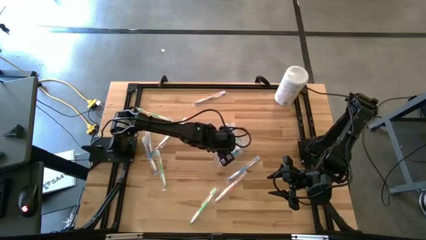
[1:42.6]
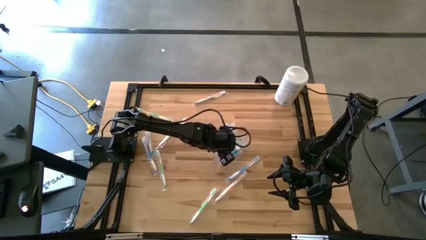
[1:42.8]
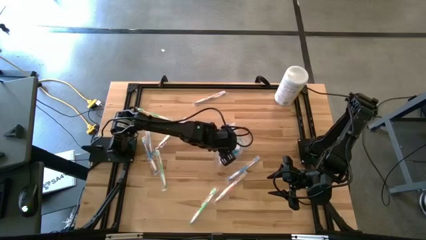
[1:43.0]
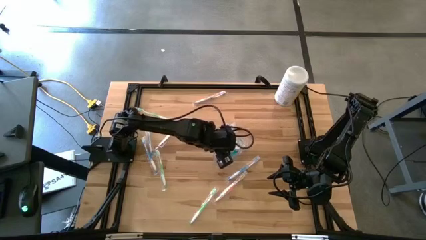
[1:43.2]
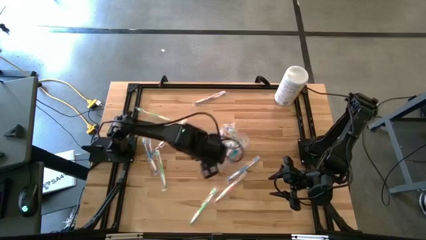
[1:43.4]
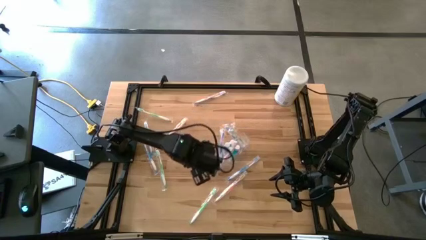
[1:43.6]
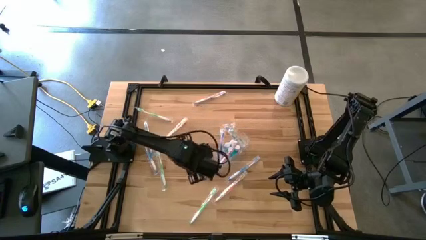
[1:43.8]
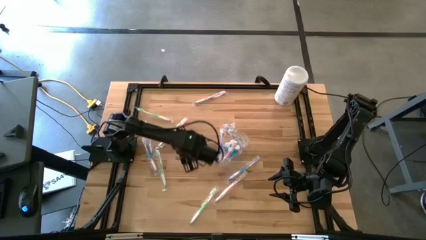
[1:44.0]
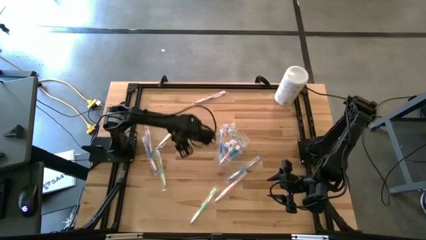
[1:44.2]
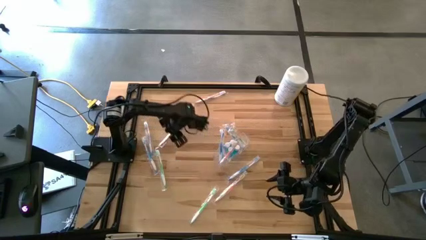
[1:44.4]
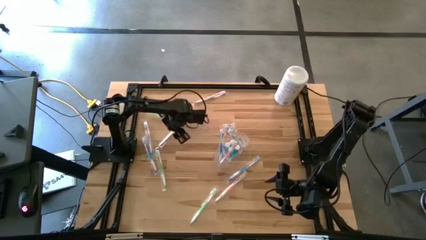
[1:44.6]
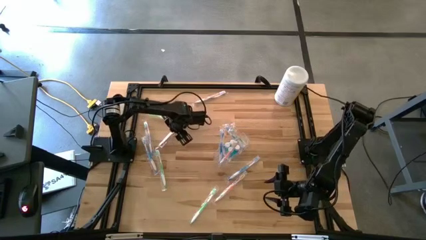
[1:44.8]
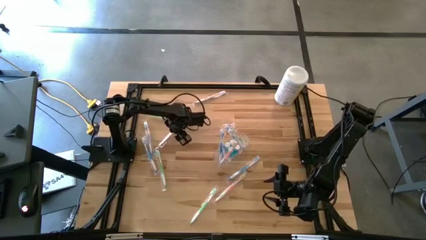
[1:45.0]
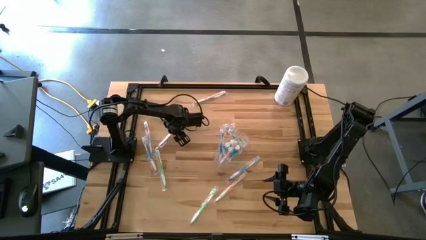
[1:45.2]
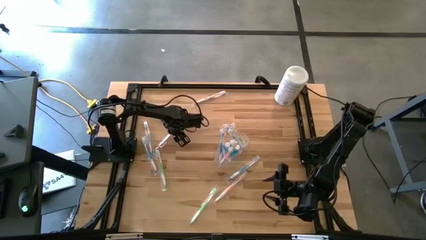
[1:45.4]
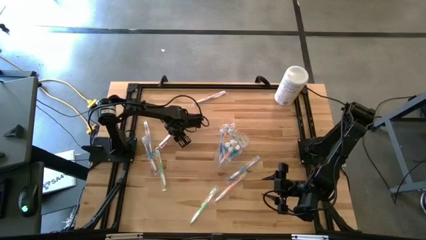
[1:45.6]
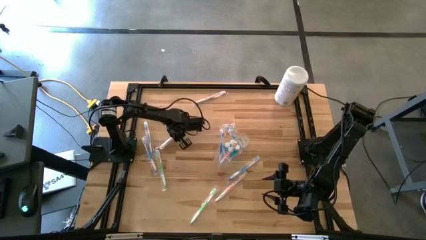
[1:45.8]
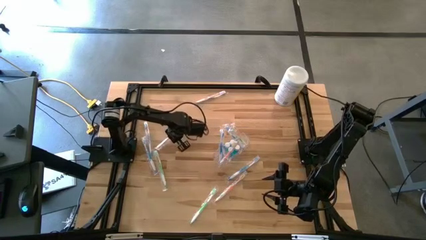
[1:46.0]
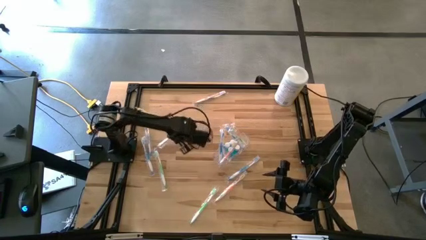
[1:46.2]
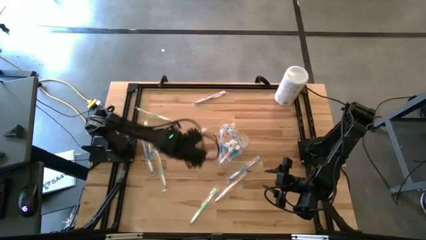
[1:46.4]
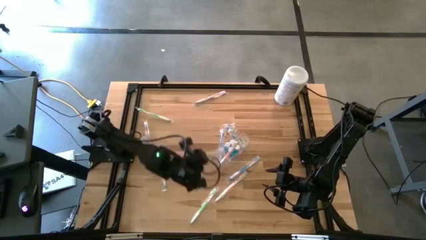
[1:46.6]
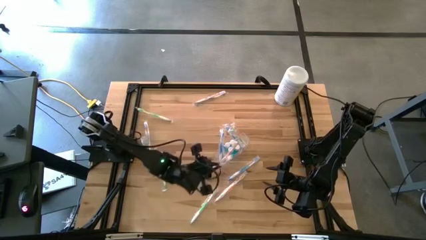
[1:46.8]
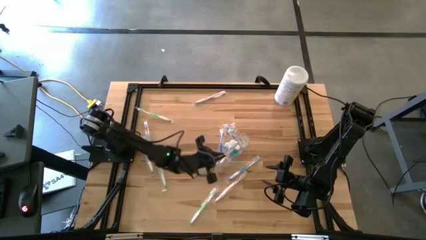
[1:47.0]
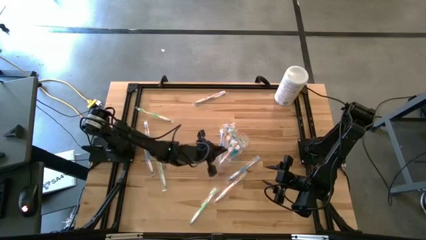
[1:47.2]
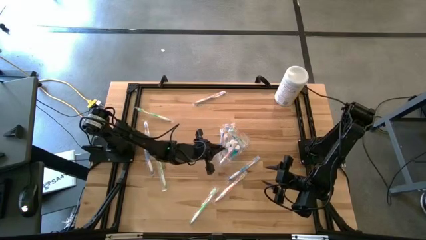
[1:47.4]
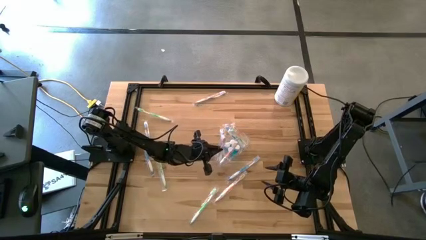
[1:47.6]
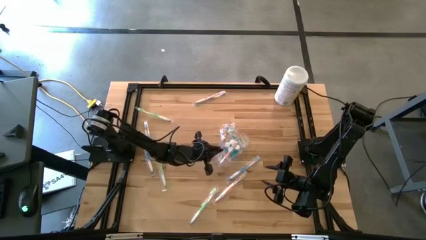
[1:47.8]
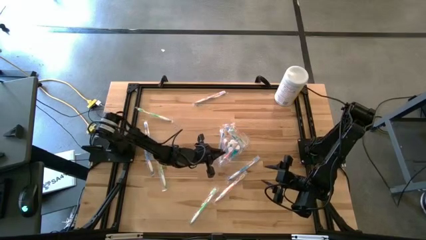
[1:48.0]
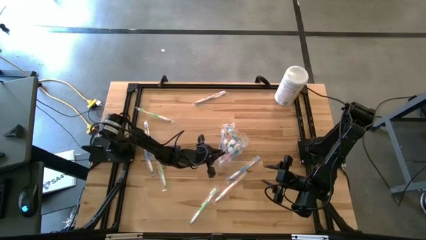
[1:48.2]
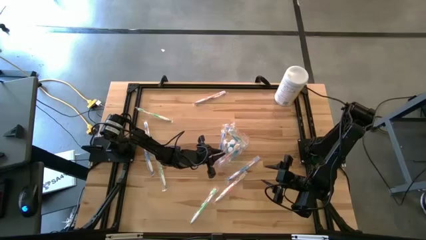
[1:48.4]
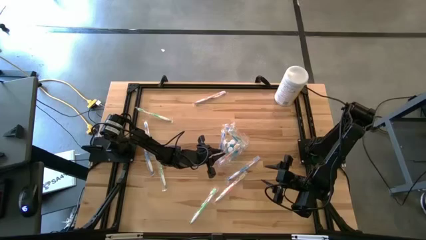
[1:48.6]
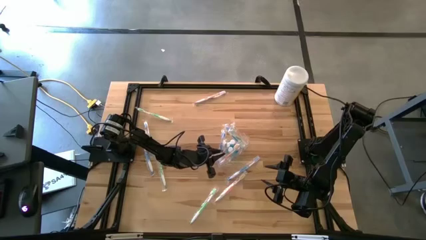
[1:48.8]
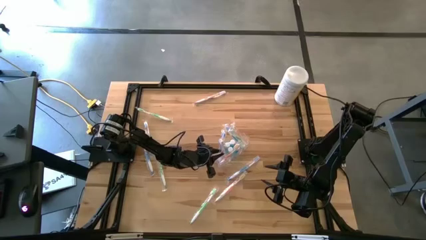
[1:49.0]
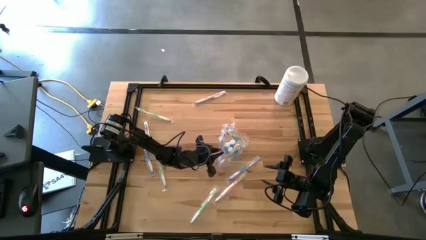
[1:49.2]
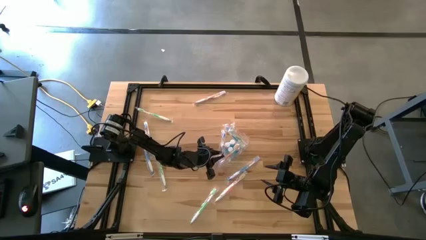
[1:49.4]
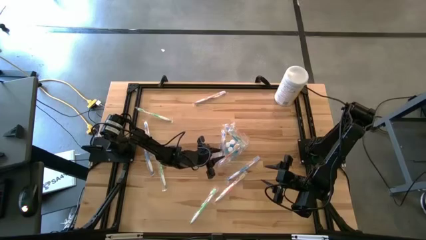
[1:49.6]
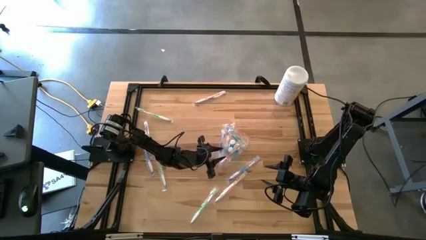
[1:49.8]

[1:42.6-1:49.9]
Task: Pick & Place toothbrushing station
Put the orange toothbrush into the transparent organizer

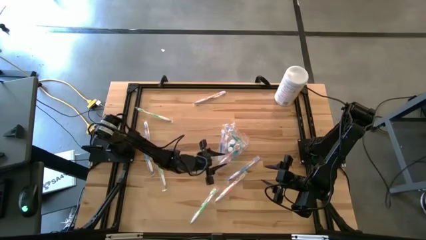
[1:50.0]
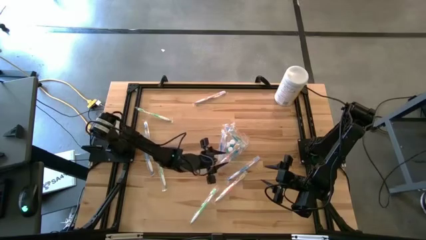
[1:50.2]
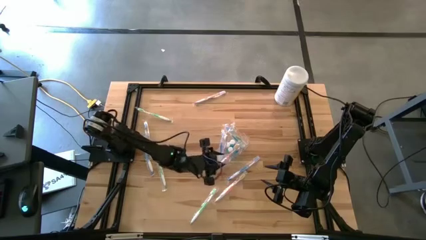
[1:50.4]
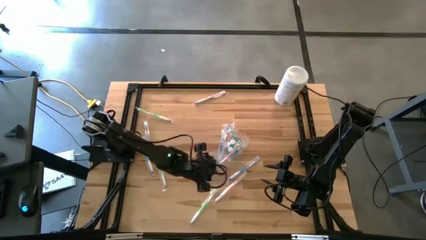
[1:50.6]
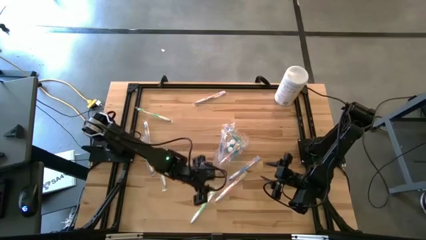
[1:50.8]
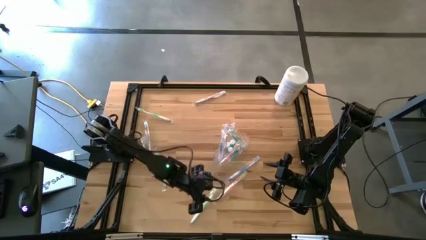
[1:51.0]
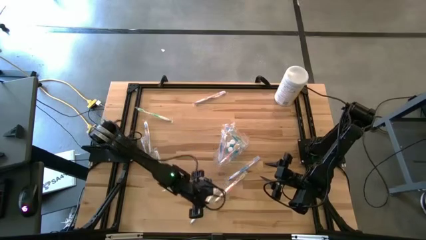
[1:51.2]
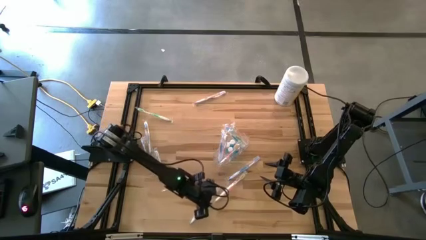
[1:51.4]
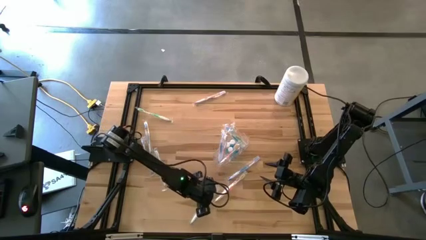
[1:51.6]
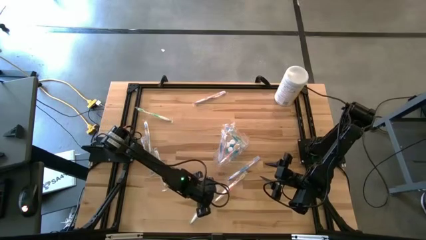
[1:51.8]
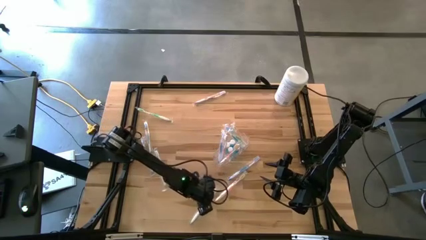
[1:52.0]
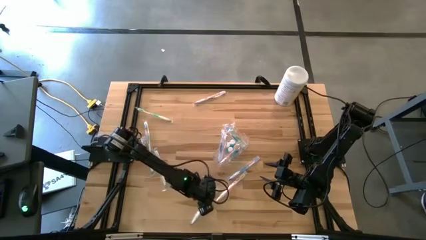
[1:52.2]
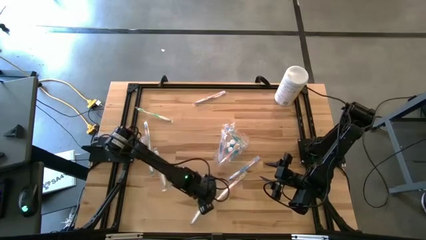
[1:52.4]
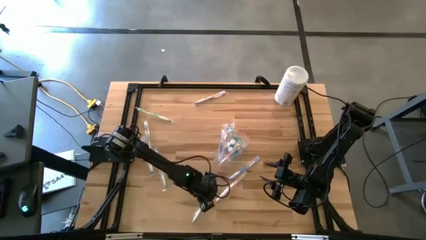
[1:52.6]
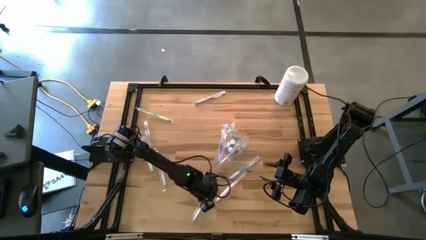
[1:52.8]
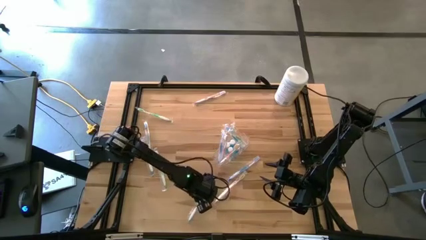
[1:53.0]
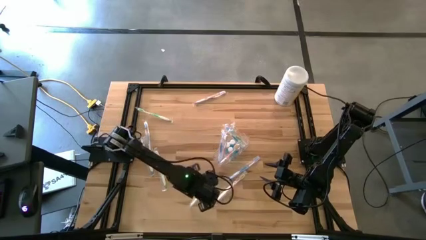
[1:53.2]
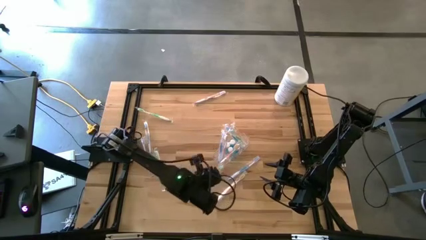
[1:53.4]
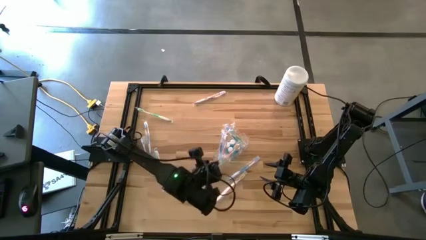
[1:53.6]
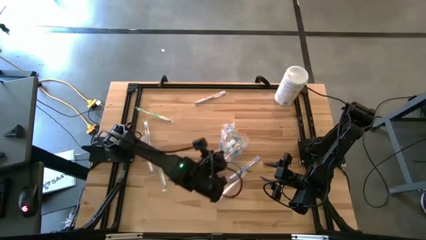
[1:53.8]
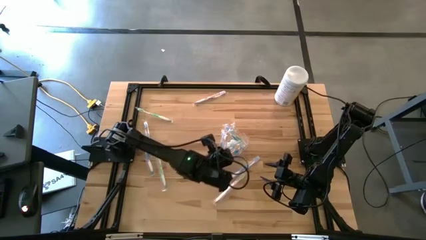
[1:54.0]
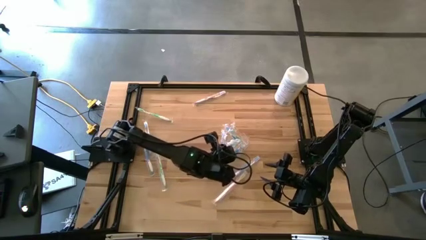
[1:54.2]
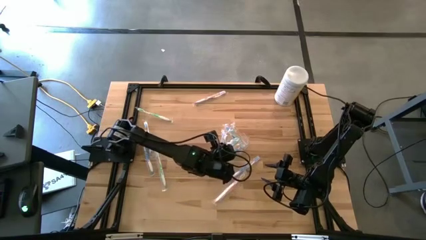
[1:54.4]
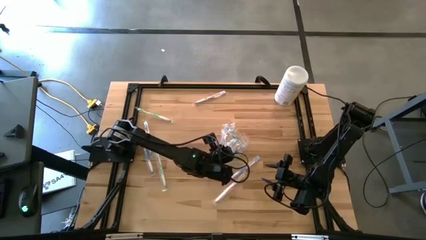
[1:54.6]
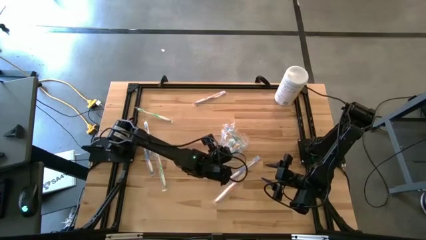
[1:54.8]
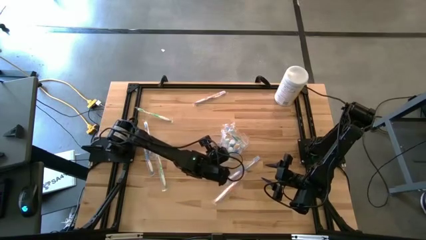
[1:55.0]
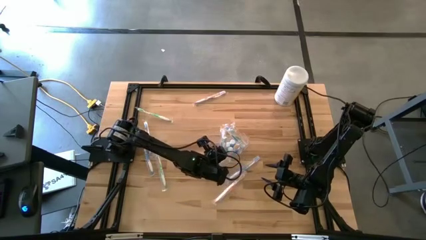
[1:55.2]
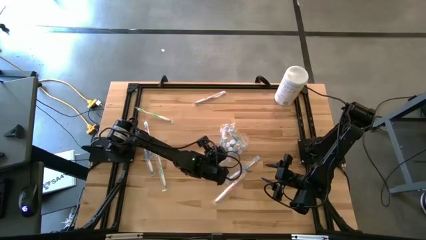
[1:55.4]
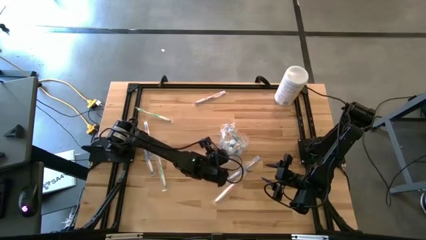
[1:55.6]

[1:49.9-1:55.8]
Put the green toothbrush into the transparent organizer
